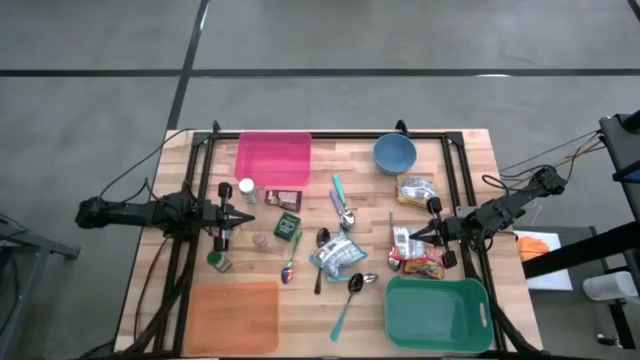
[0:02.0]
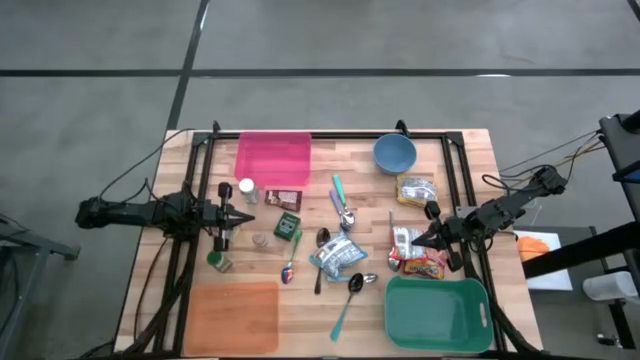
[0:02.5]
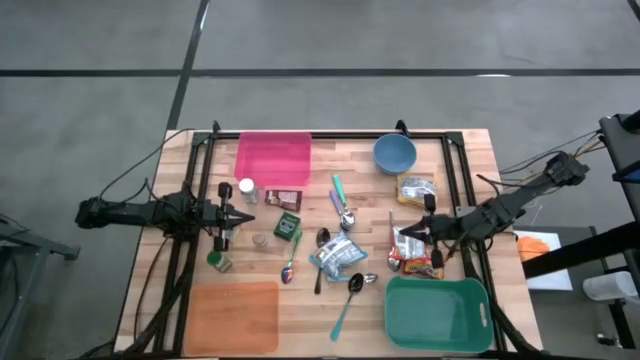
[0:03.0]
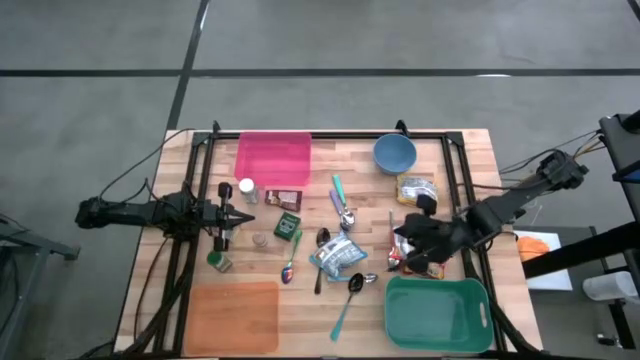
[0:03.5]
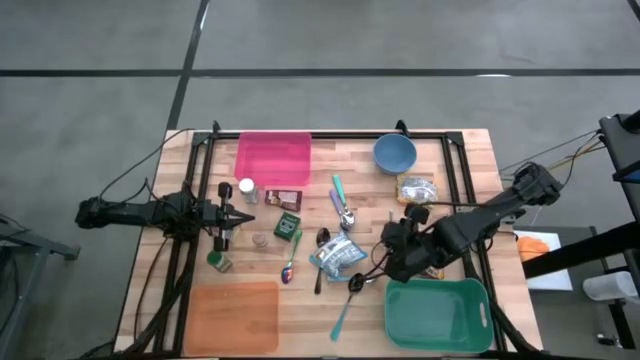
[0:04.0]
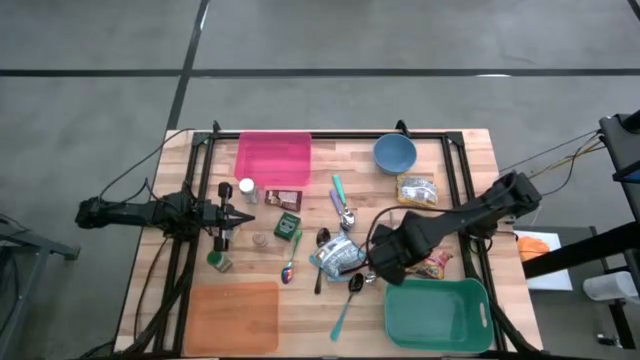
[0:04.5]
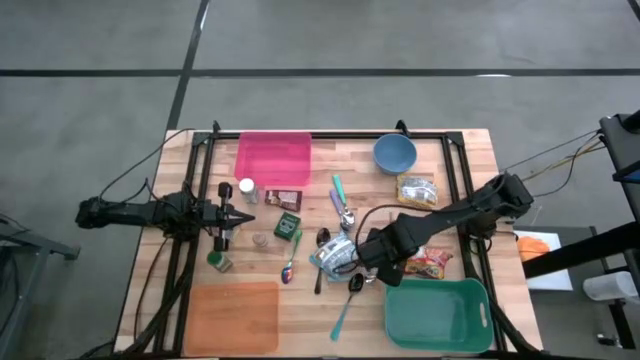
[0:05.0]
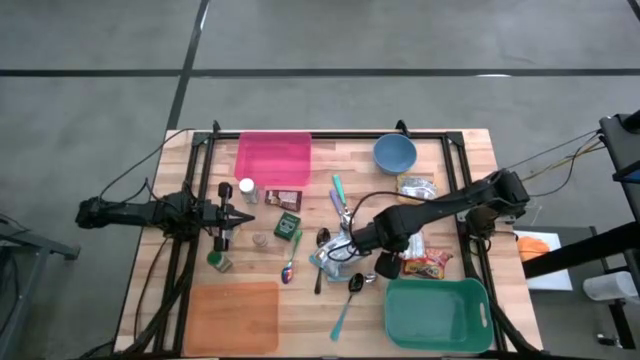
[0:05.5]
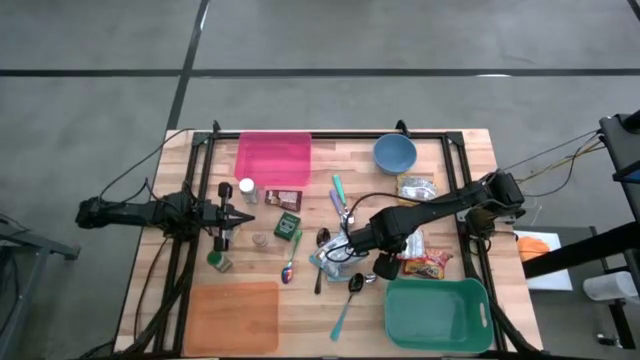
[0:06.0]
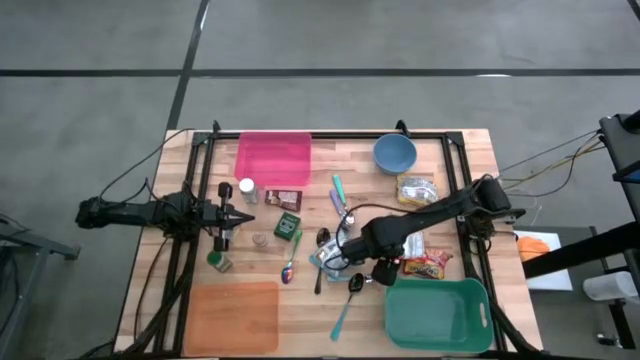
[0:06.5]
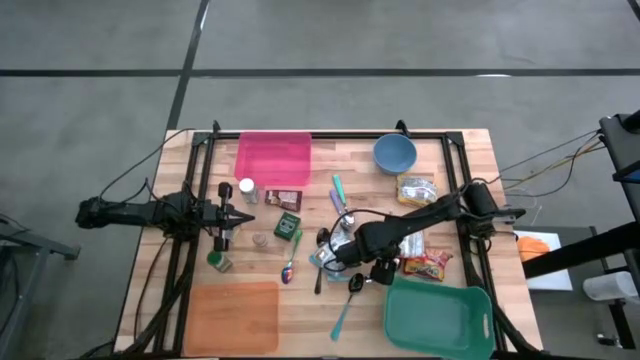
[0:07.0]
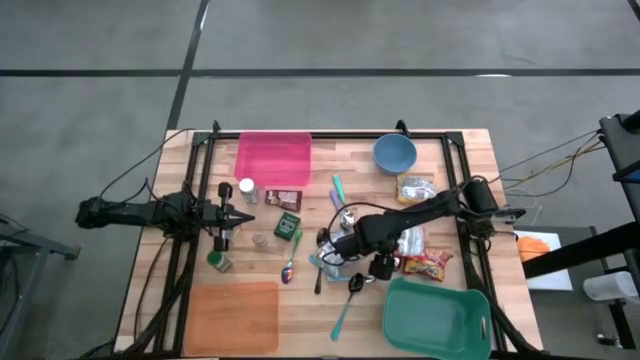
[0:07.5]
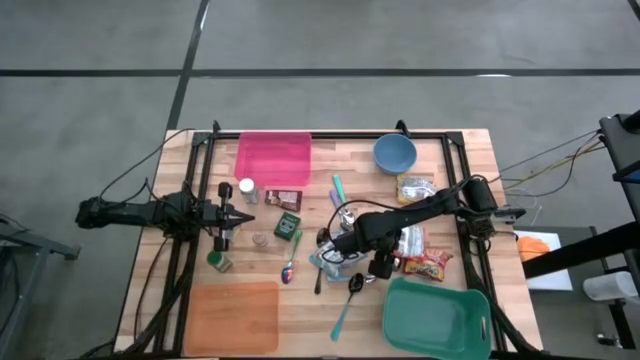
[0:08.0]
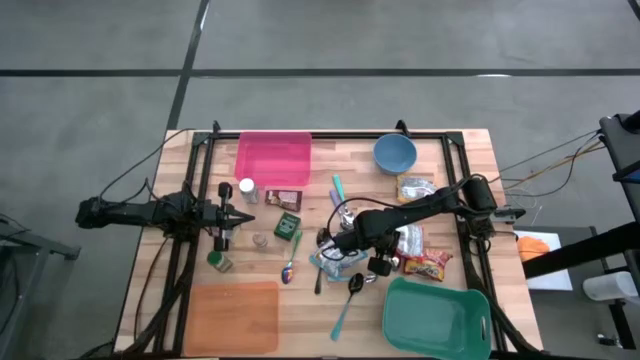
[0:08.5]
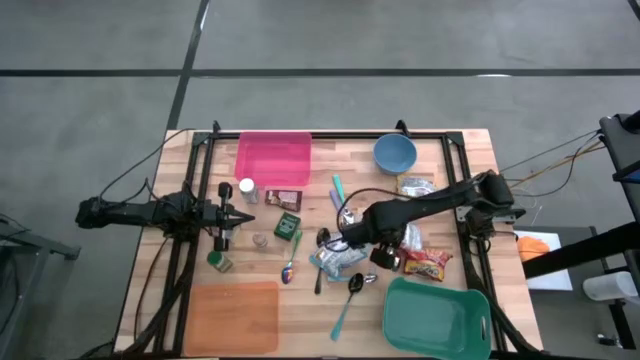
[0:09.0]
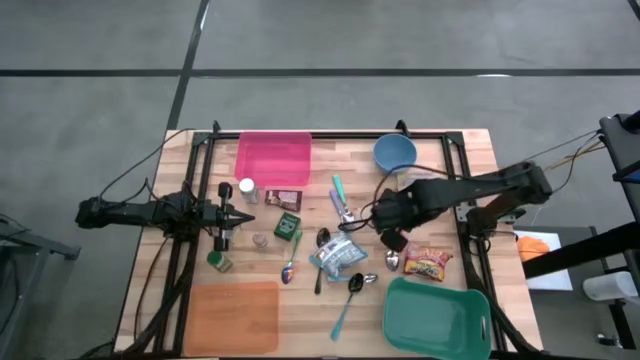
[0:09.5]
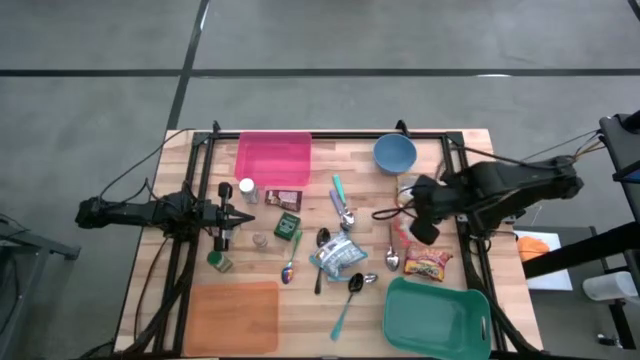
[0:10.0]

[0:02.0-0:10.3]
Put the orange noodle pack into the green bin

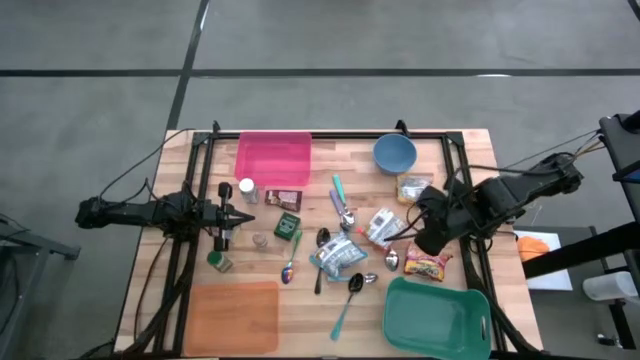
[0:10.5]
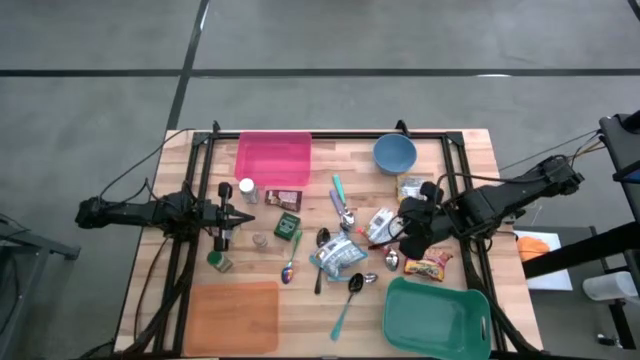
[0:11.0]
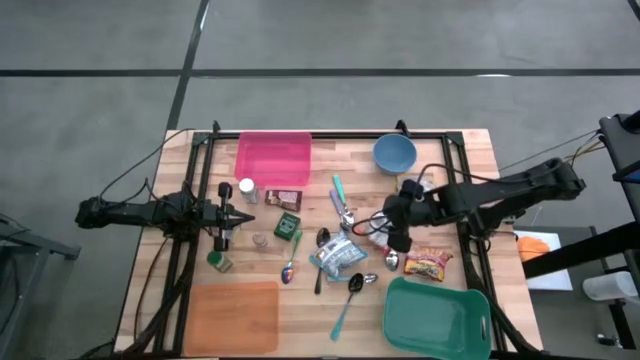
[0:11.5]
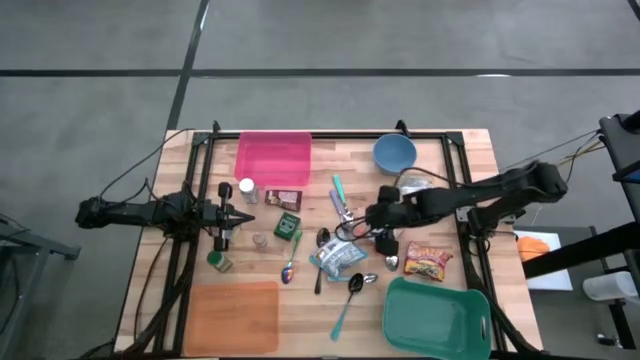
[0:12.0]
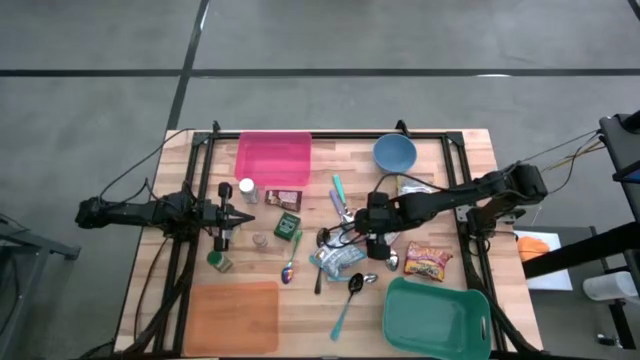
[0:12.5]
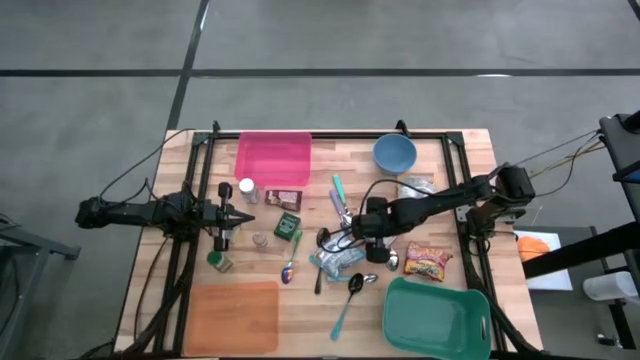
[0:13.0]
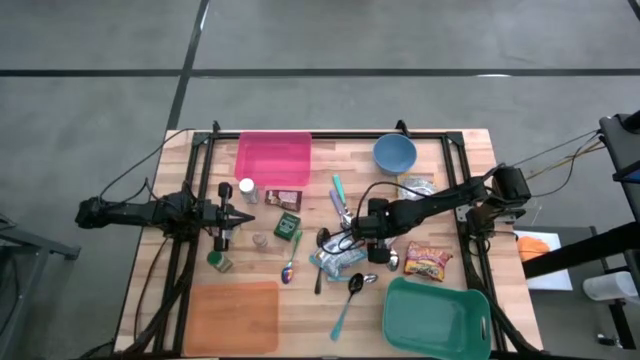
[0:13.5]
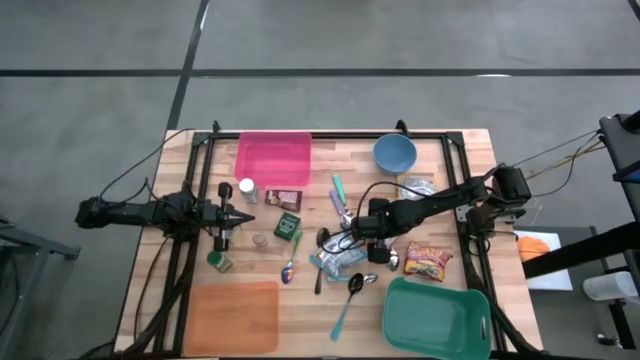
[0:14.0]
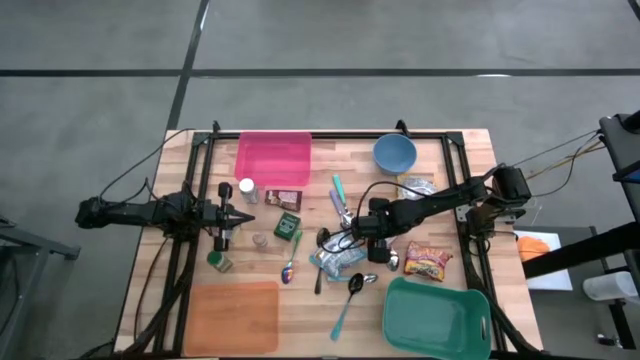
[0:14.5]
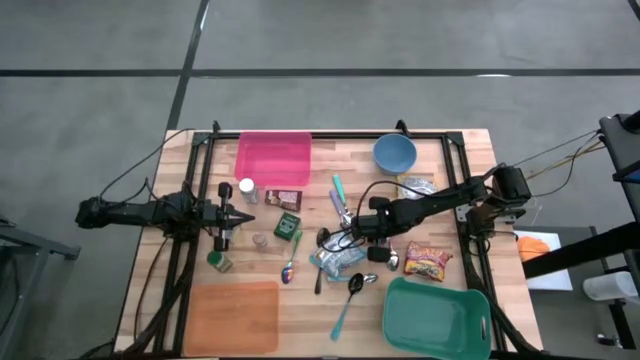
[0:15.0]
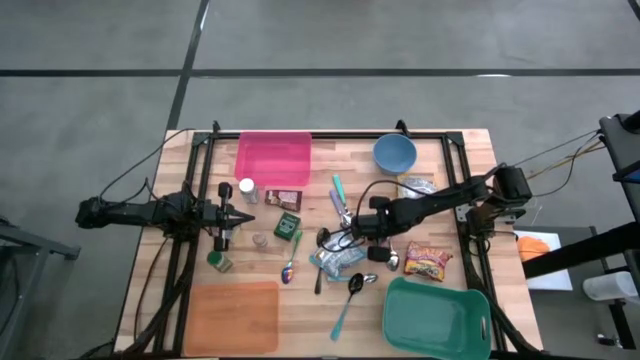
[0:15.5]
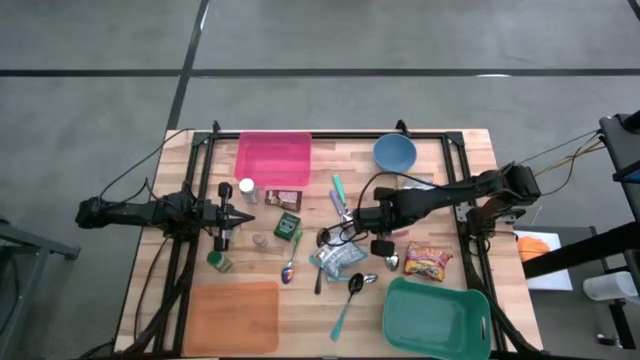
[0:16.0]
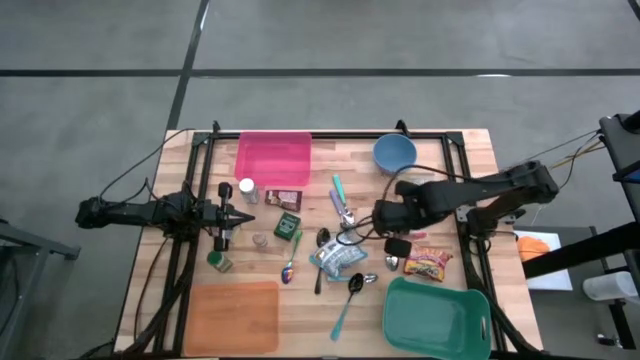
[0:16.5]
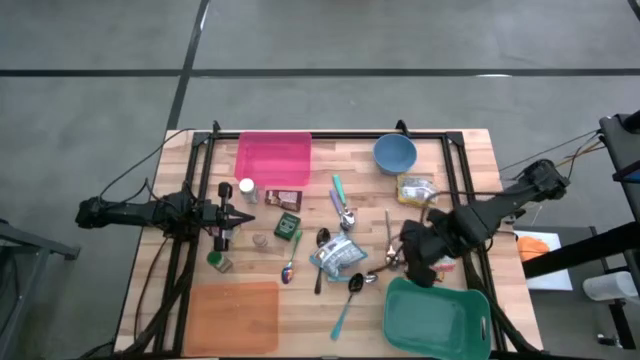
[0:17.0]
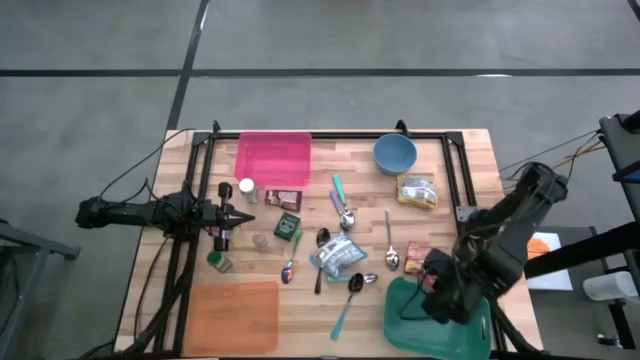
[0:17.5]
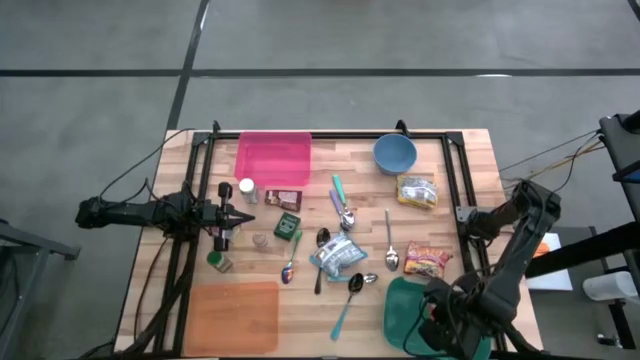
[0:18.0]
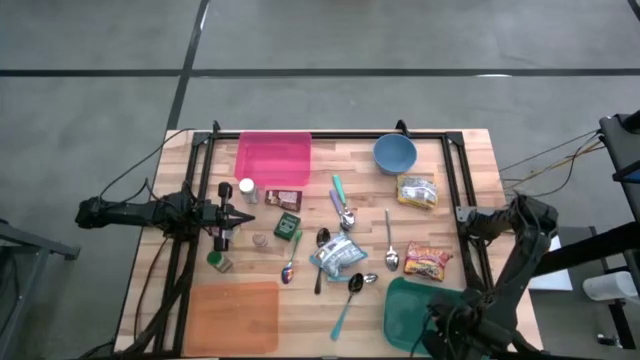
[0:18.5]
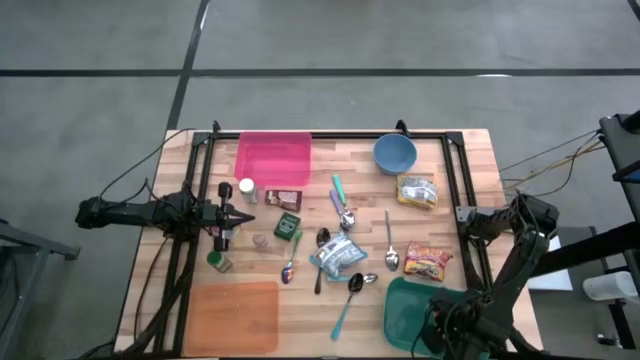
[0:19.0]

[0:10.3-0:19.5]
Put the orange noodle pack into the green bin

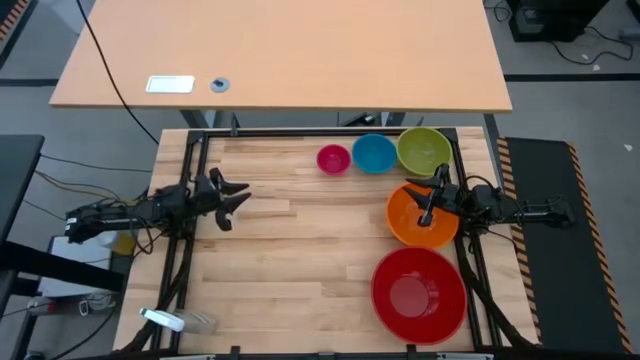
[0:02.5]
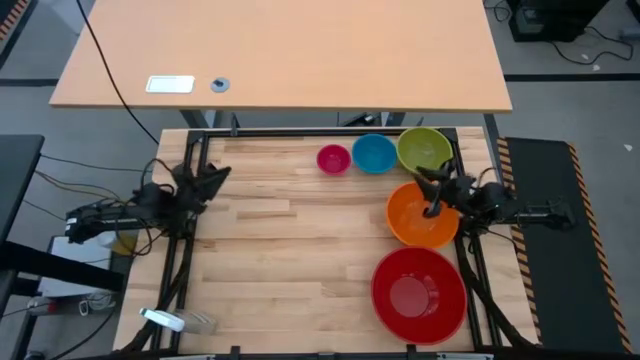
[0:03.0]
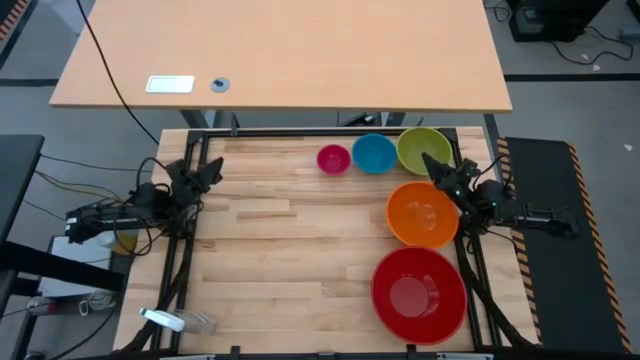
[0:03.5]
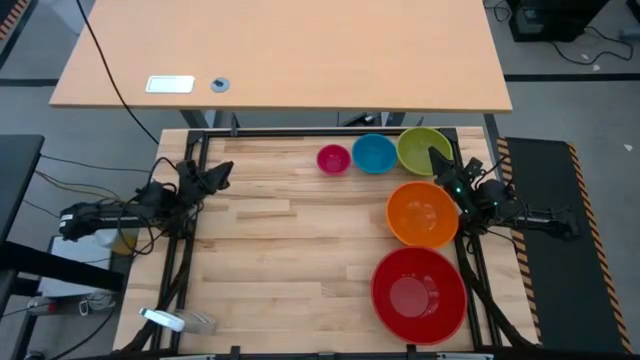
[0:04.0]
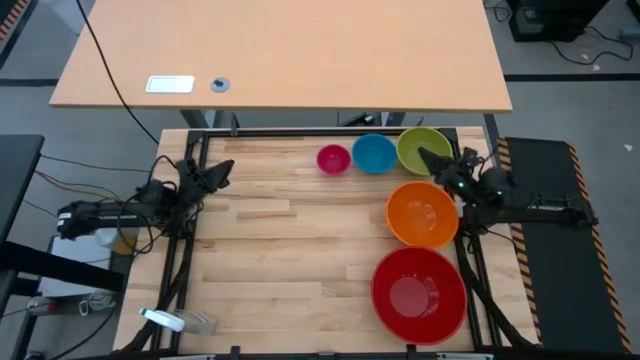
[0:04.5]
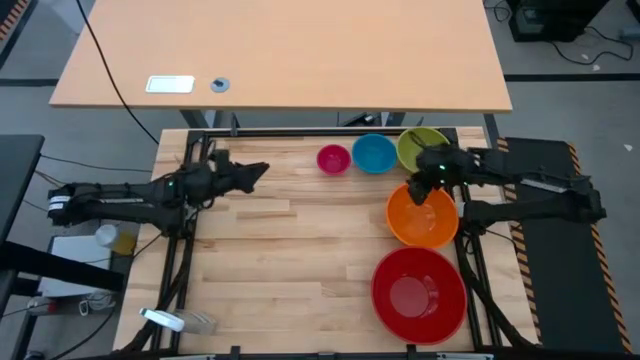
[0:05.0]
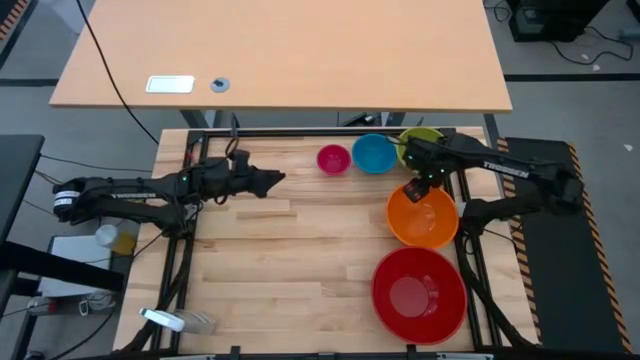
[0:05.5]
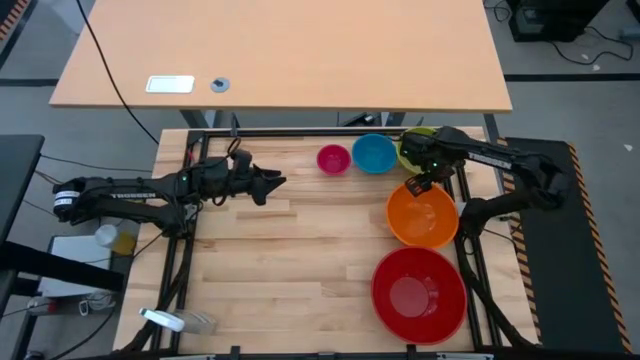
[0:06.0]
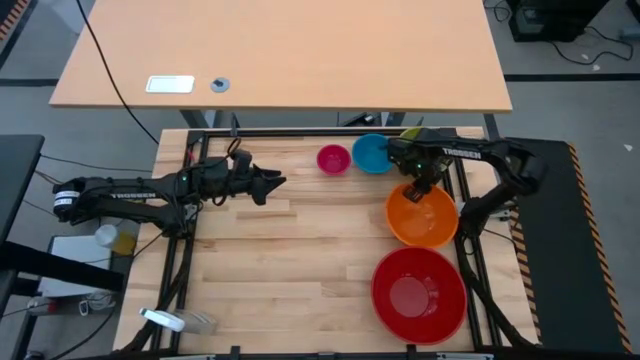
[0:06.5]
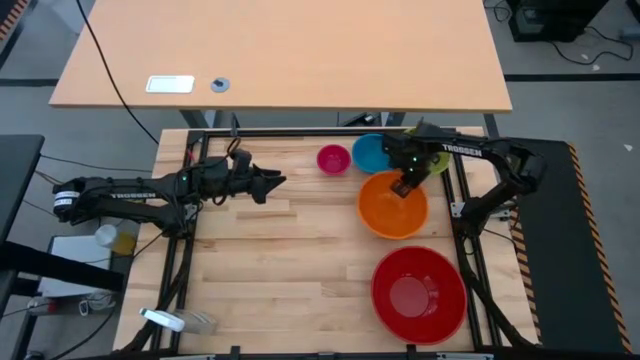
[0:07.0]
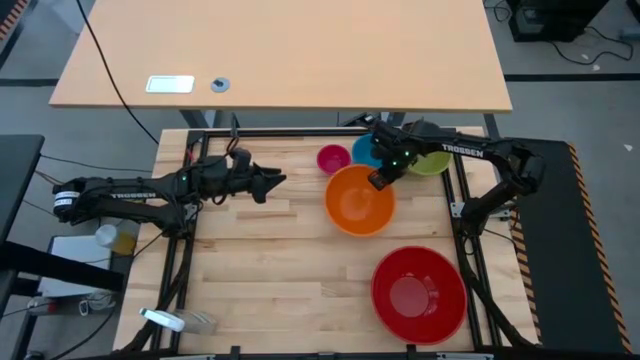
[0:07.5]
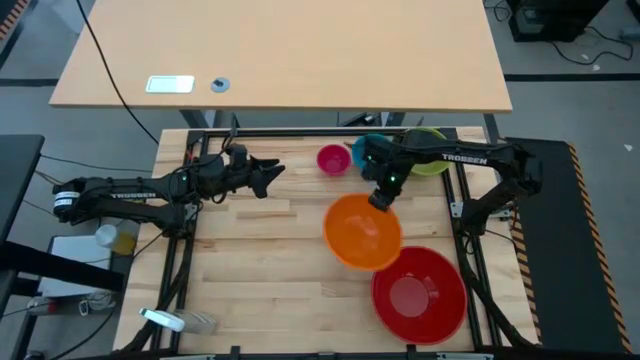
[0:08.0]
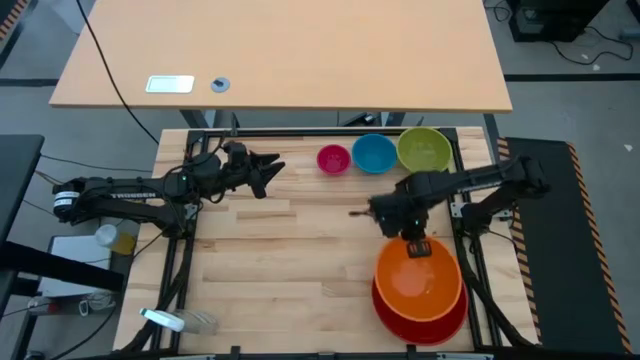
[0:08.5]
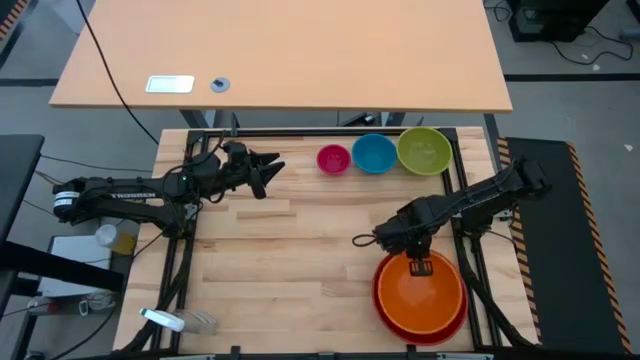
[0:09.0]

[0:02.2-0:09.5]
Stack the orange bowl on top of the bottom red bowl
